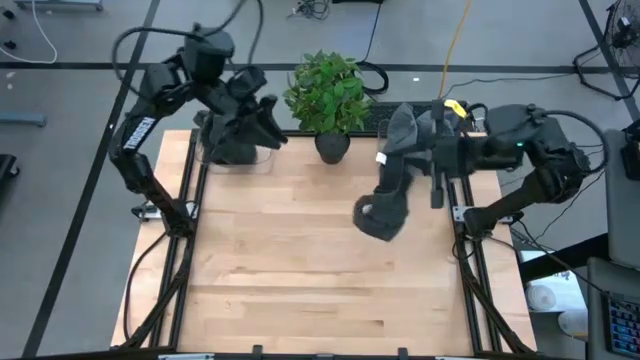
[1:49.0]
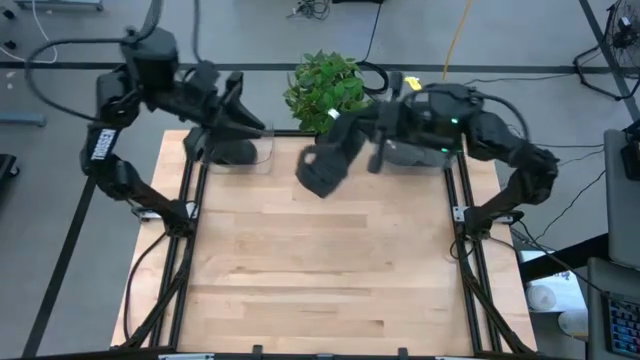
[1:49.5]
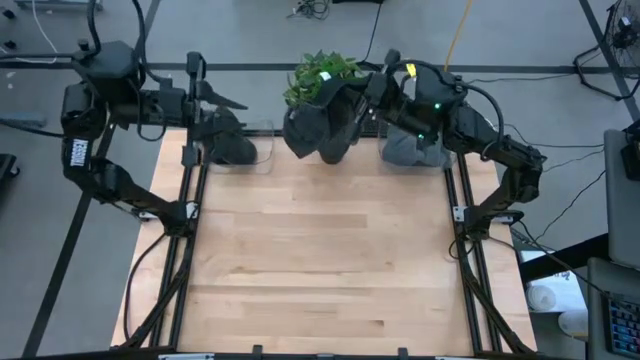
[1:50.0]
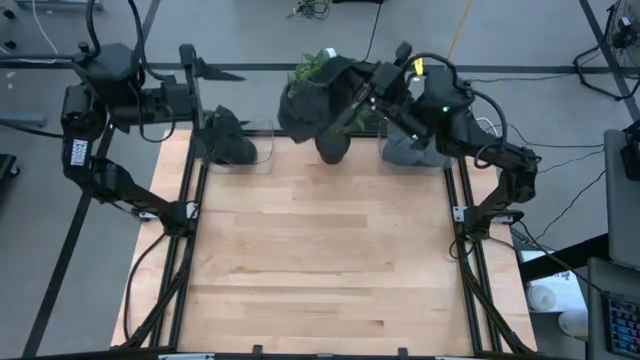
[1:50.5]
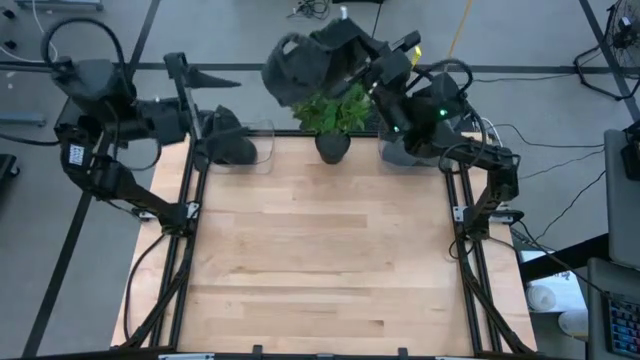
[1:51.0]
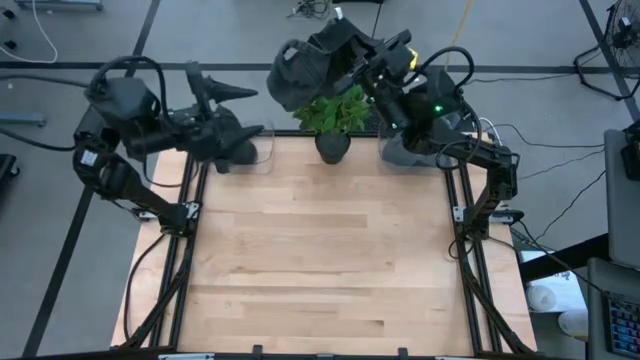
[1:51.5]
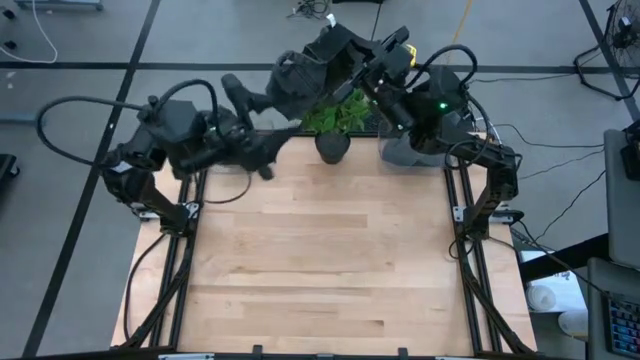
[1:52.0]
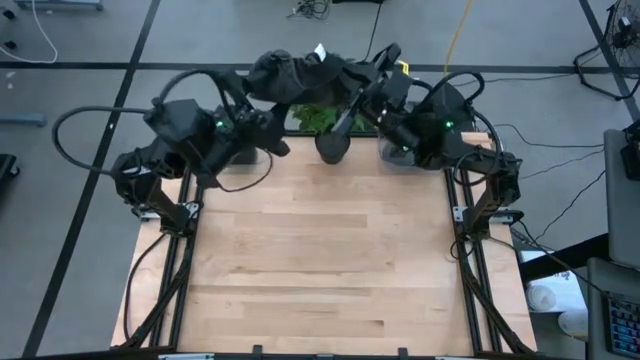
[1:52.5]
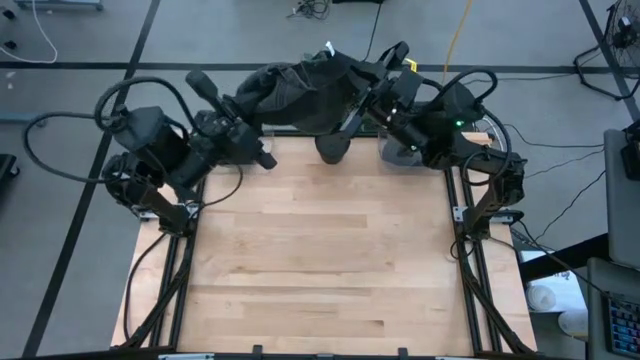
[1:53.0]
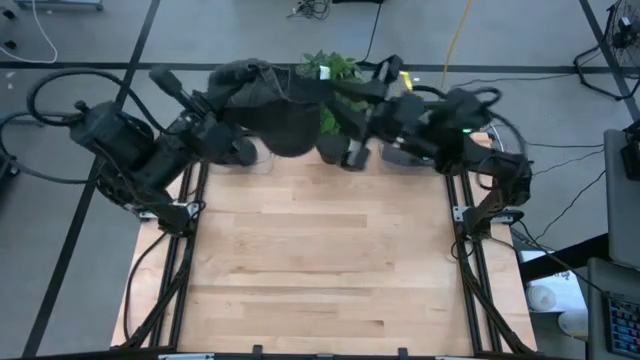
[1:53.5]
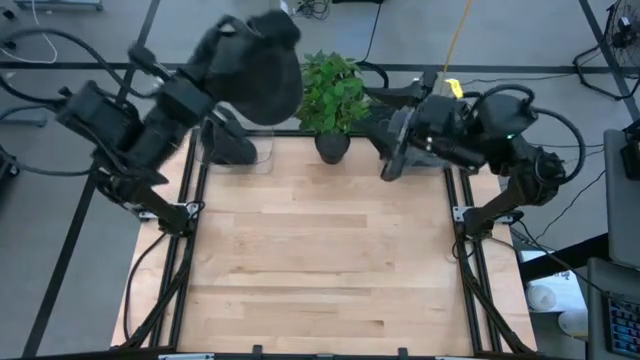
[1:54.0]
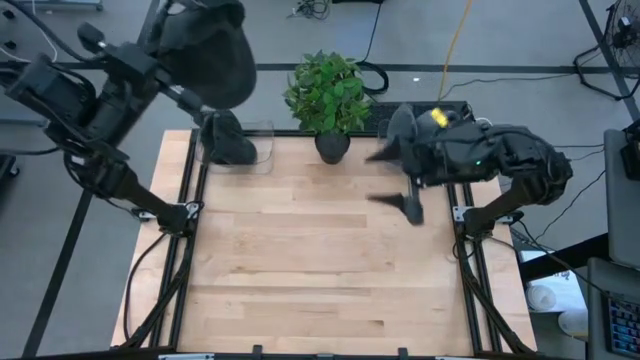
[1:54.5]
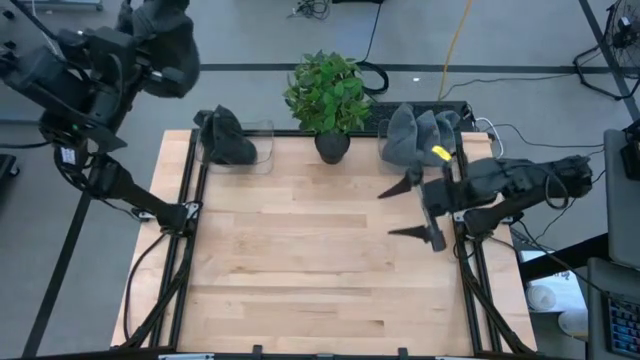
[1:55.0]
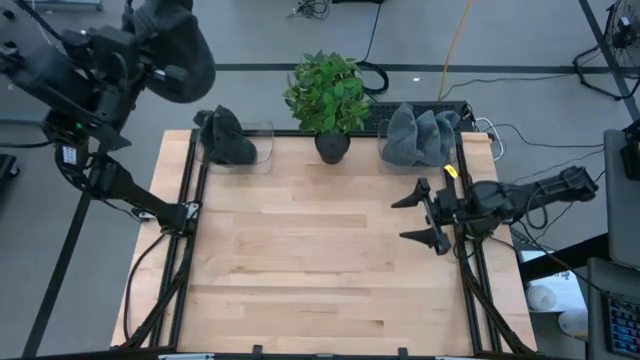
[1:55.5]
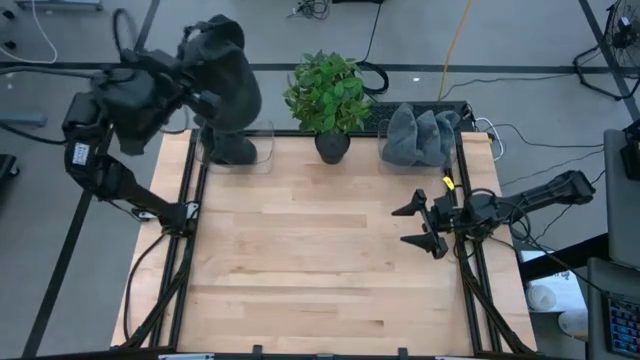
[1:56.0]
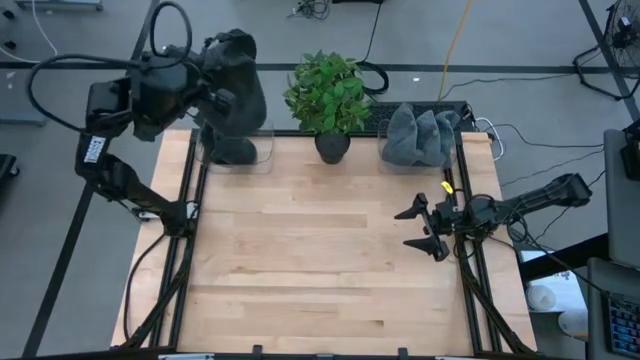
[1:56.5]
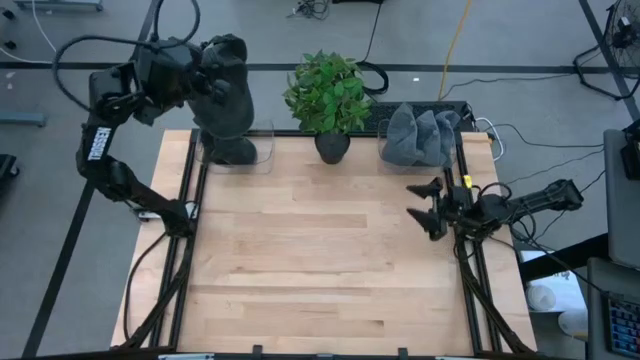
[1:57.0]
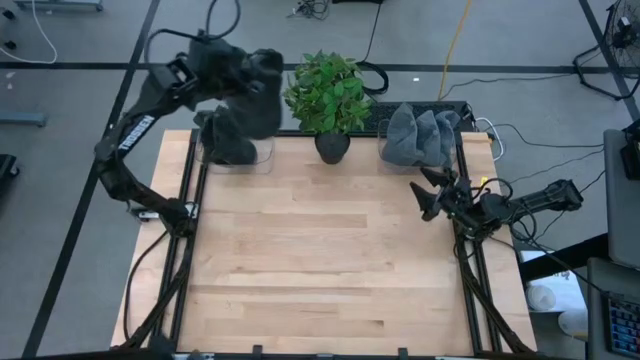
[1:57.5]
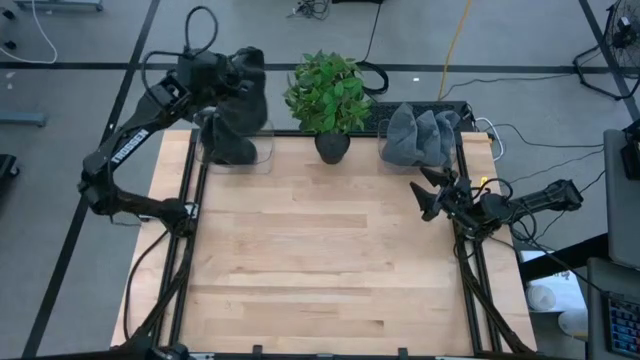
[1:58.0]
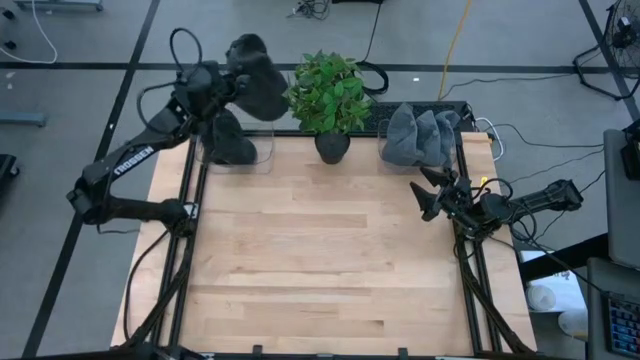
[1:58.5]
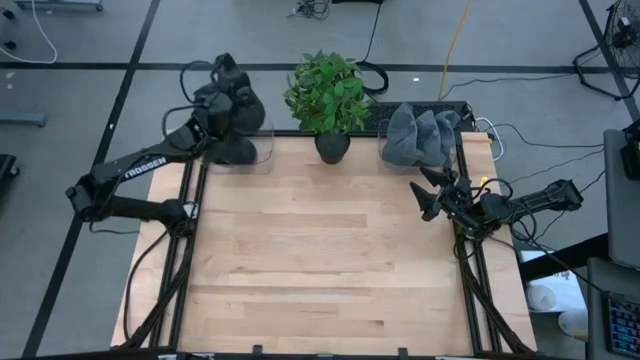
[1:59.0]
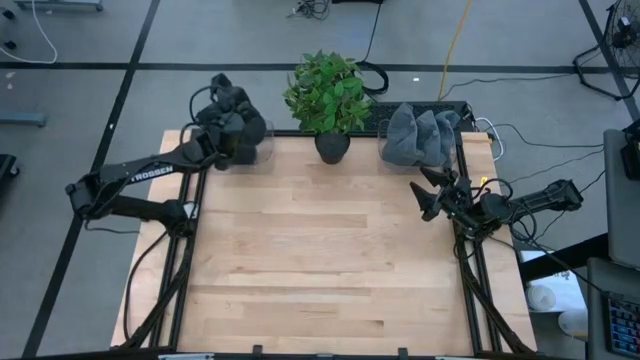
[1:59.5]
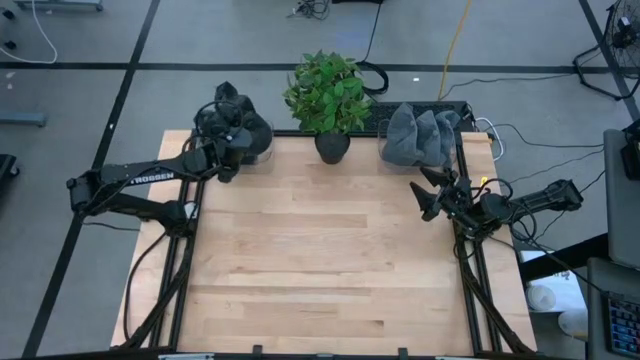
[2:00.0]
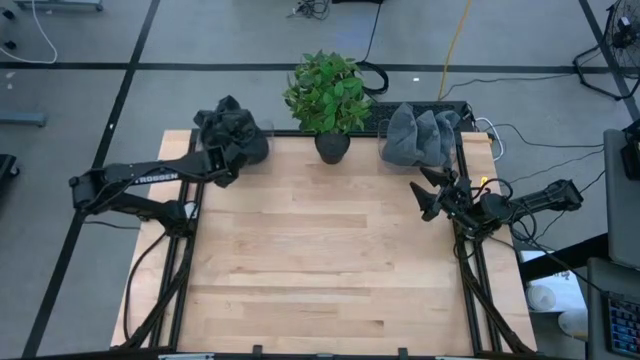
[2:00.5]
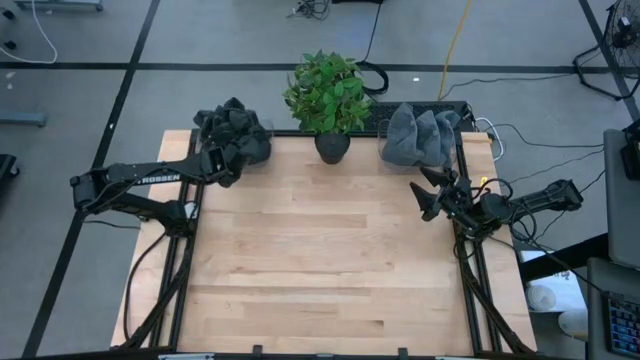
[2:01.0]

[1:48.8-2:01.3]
Task: Pick & Place hat
Put the black cap into the left transparent bin

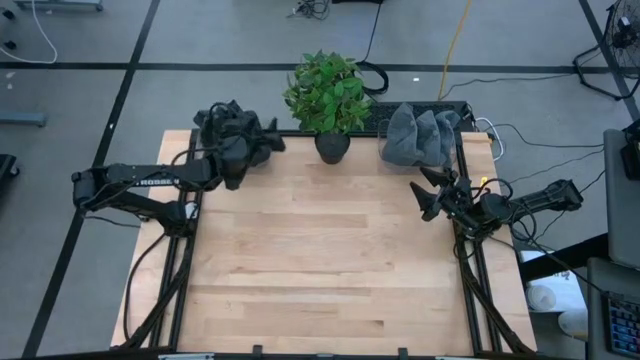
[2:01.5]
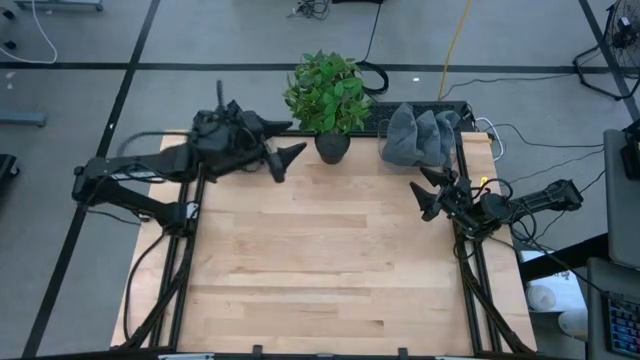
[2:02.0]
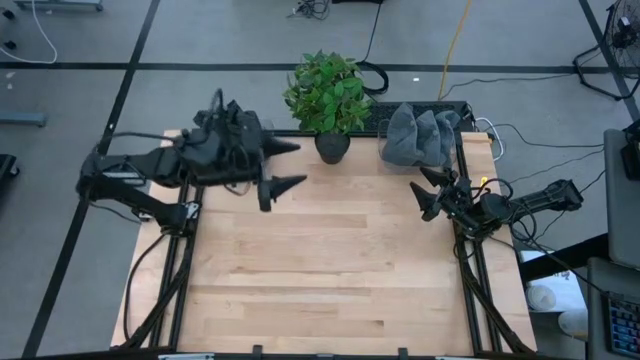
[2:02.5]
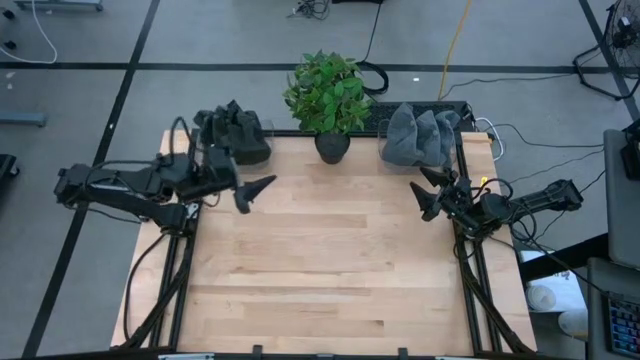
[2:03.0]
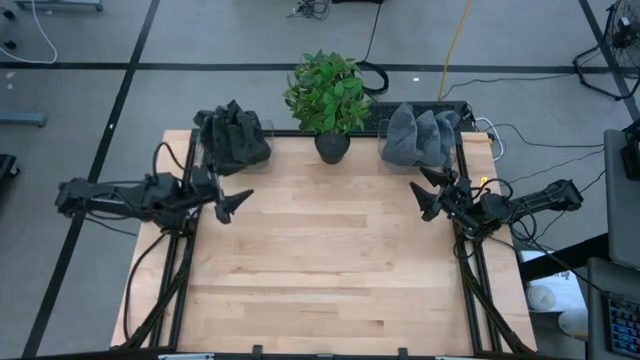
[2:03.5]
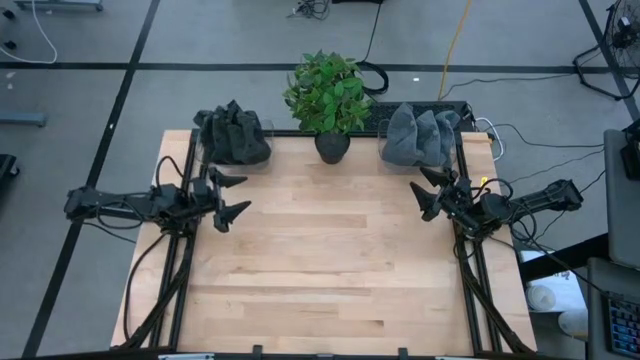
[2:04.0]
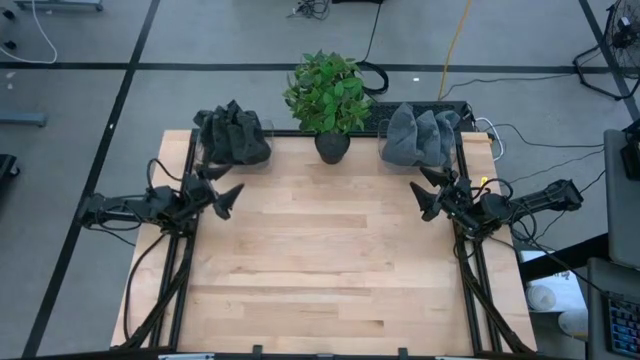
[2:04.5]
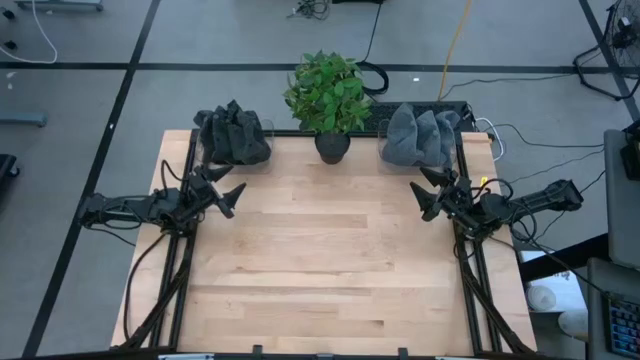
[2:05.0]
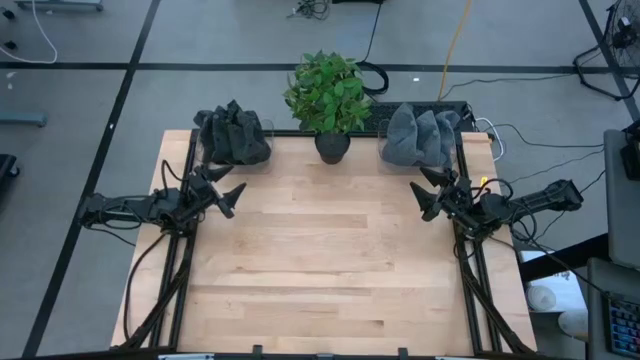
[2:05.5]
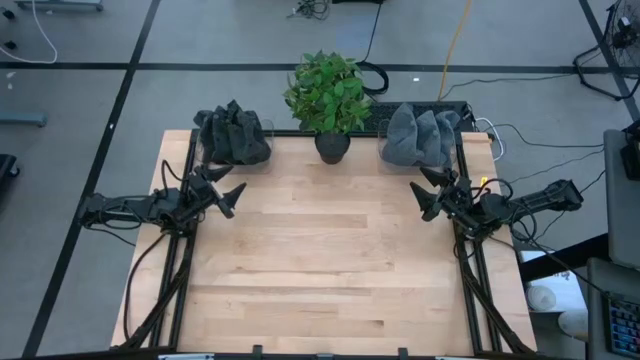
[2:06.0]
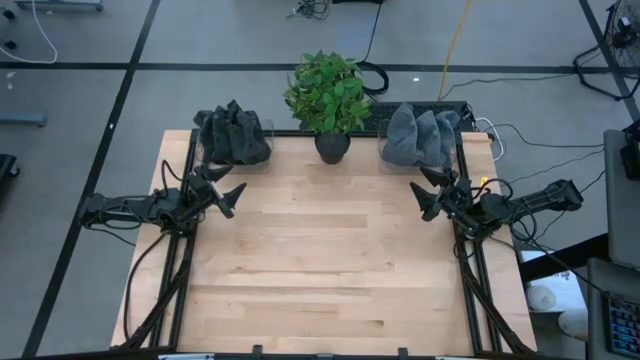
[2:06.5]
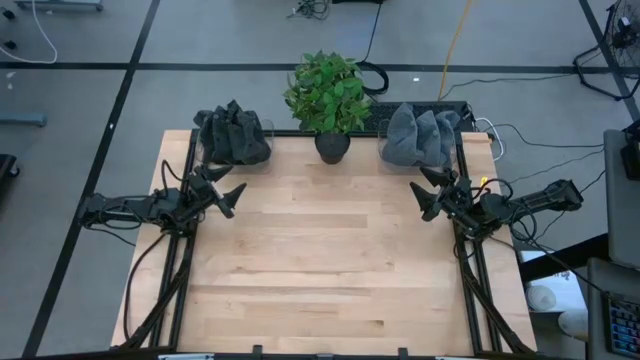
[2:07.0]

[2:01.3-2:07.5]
Return to Home Position
